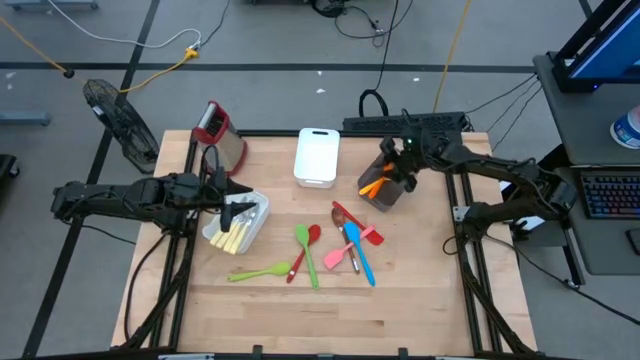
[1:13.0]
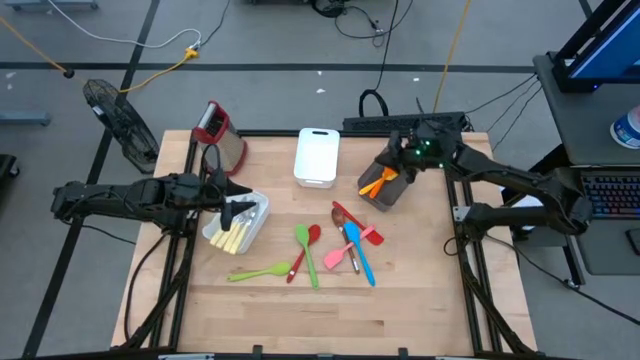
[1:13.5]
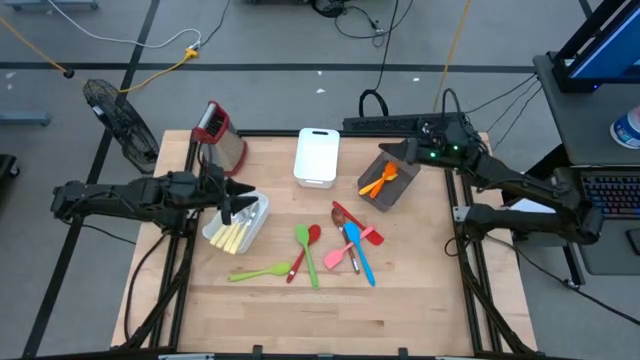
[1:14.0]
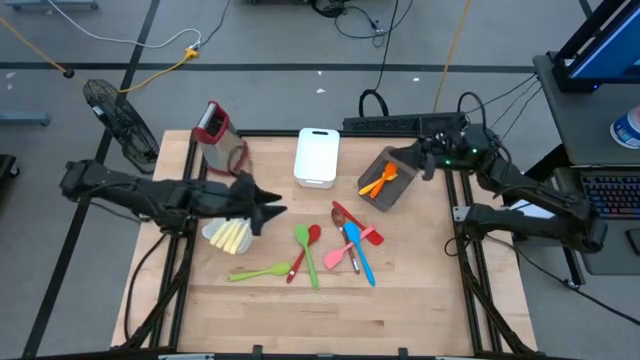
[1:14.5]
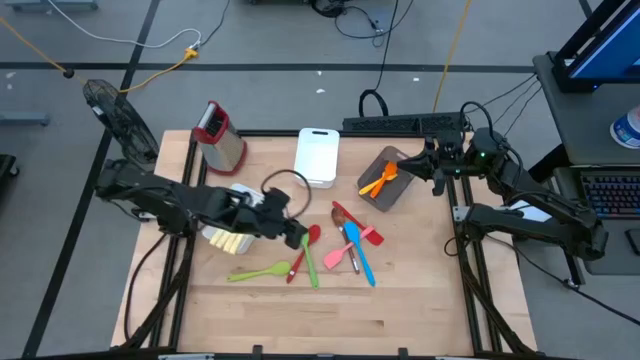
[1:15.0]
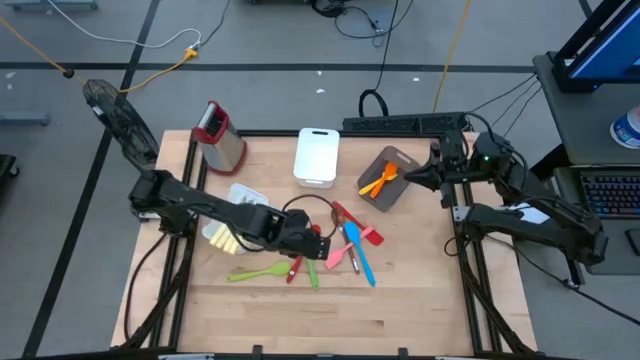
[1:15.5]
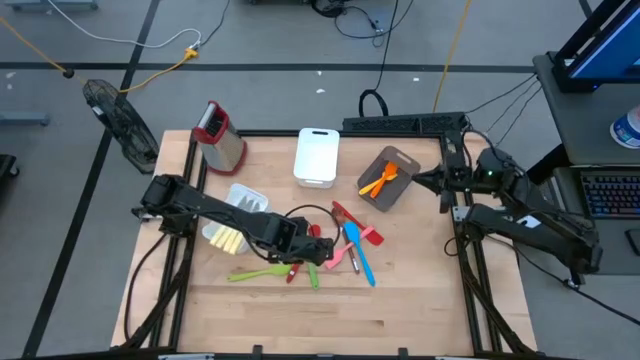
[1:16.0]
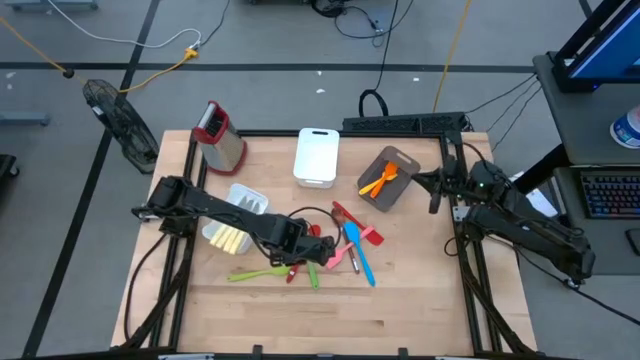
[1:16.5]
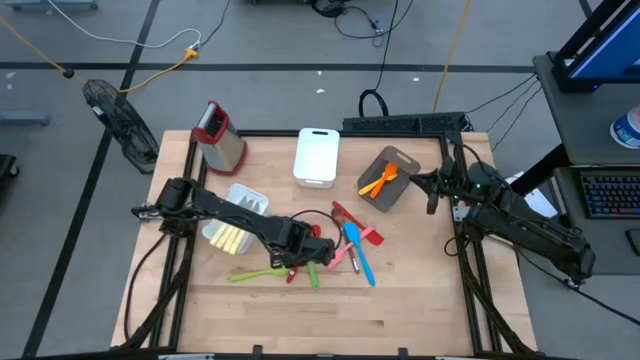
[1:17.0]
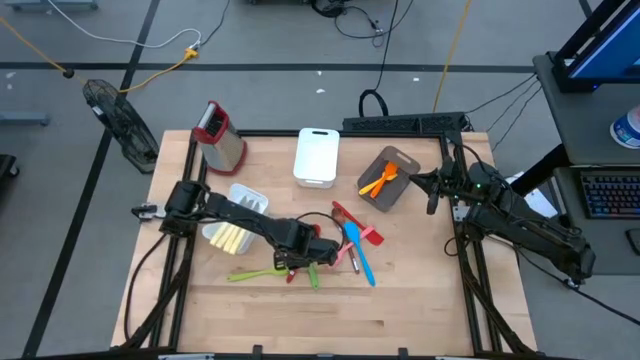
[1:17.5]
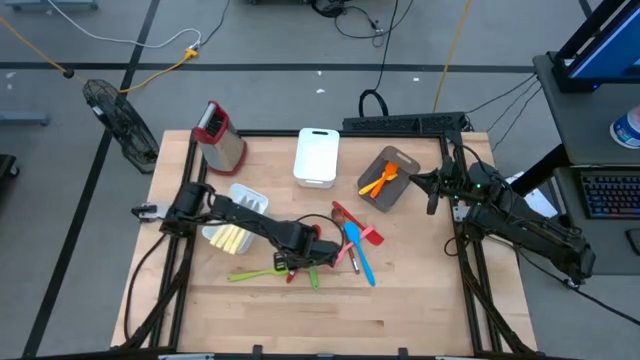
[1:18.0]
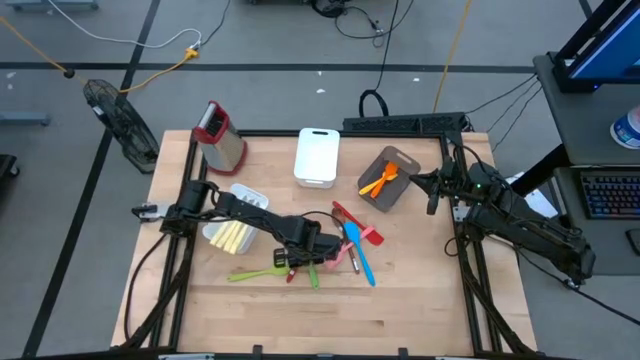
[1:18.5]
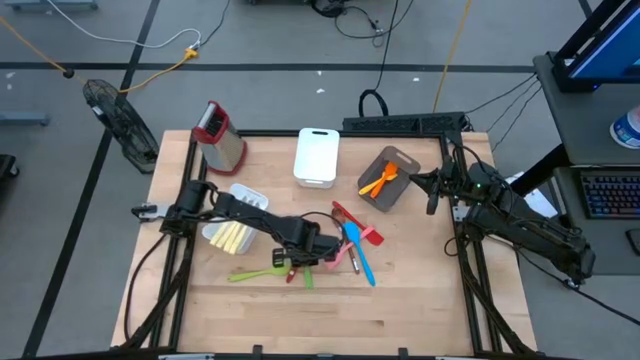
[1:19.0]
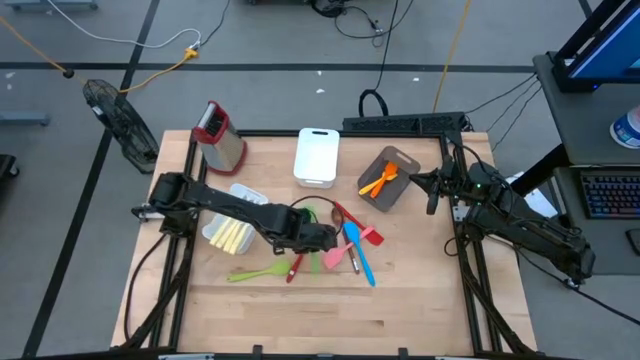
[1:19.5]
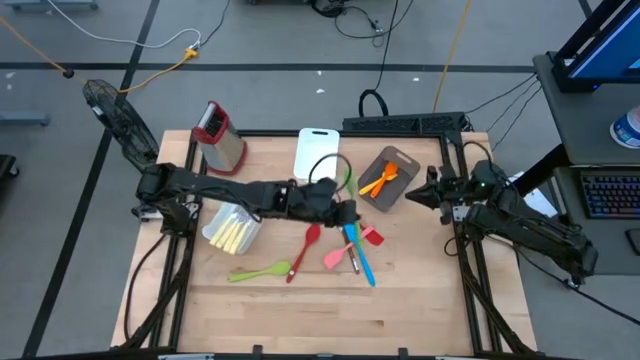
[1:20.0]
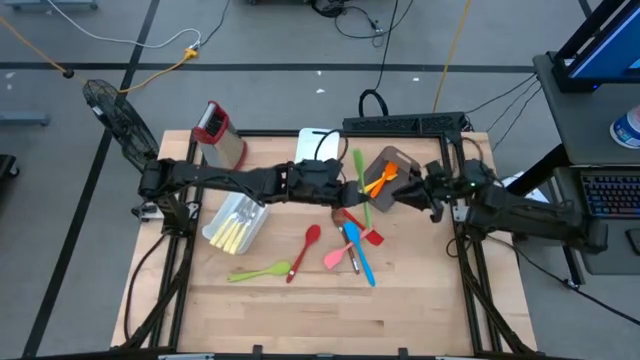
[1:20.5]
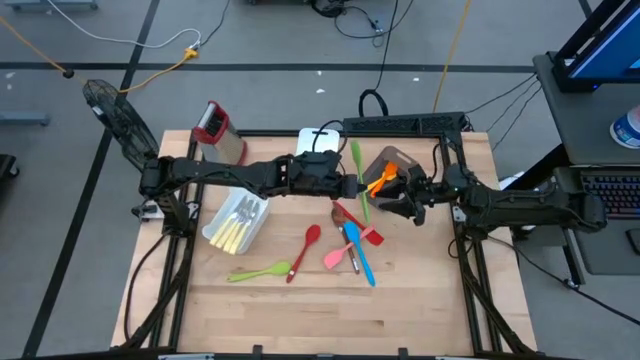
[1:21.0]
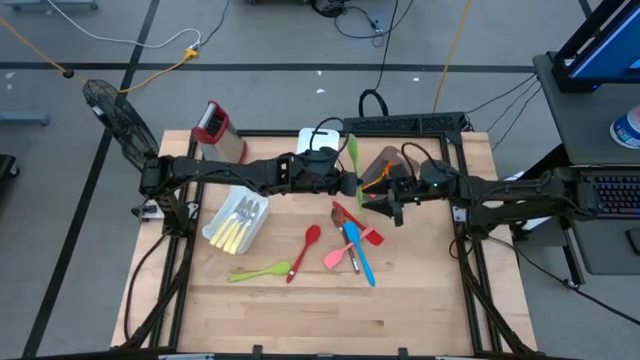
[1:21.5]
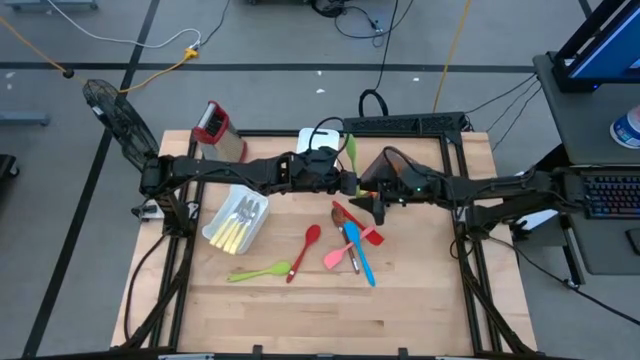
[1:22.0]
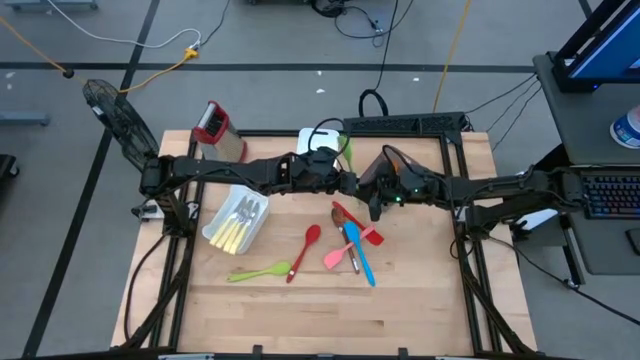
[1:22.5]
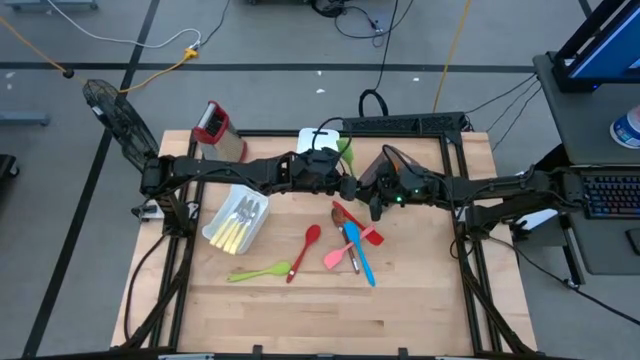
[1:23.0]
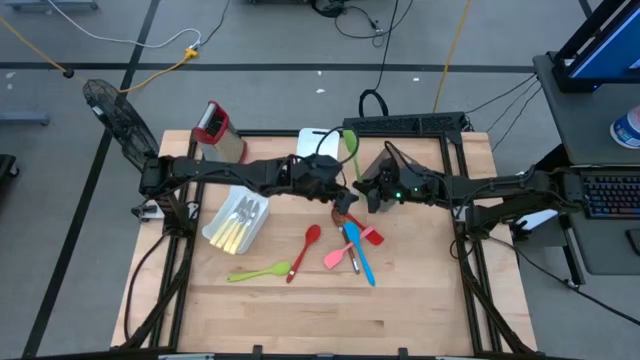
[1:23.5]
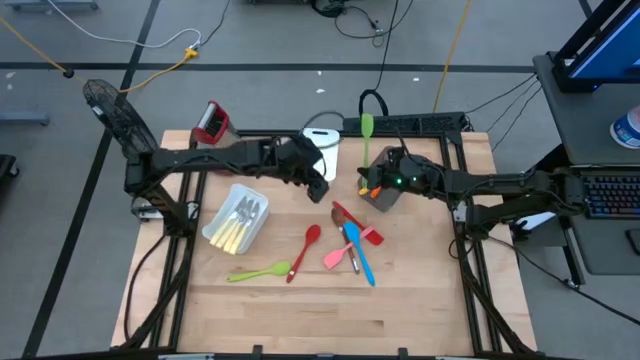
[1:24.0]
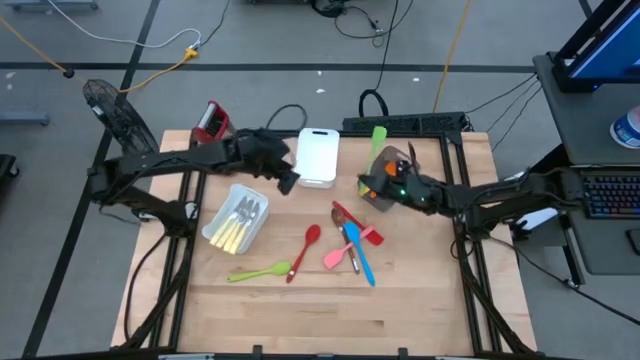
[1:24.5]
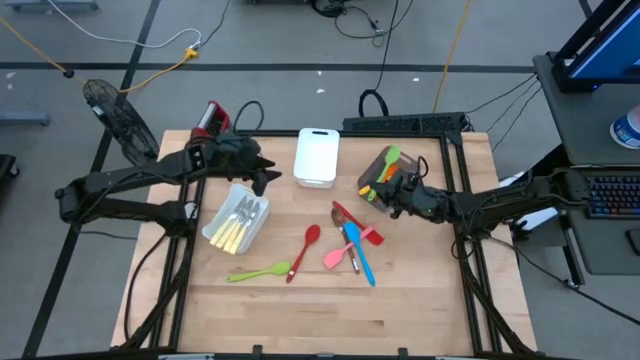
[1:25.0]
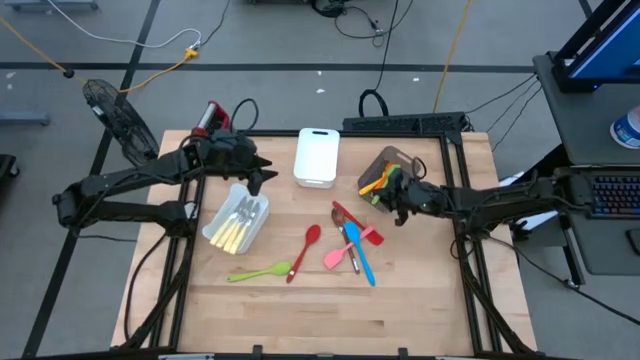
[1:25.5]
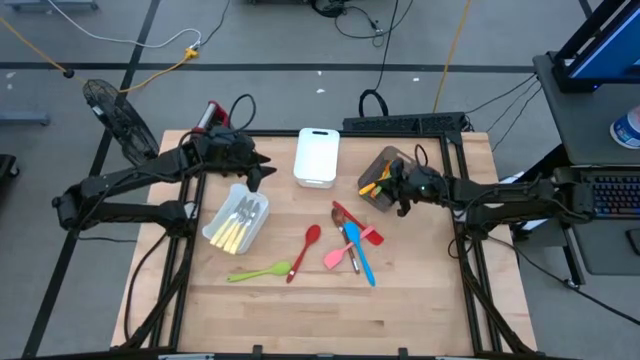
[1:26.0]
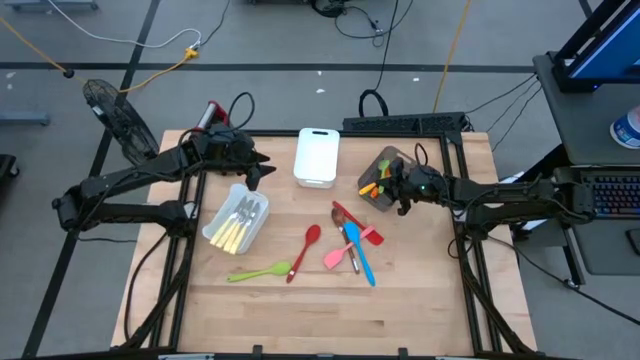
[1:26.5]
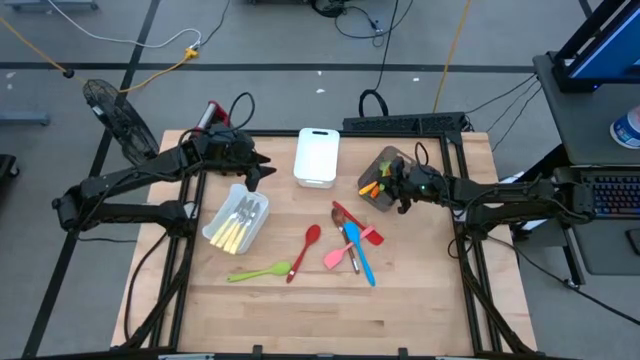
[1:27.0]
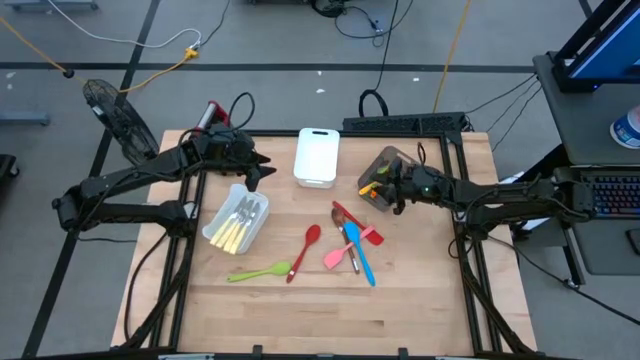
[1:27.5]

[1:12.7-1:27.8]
Task: Pick & Place Kitchen Items
Put the green spatula into the black bin
